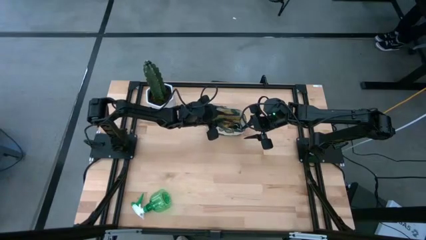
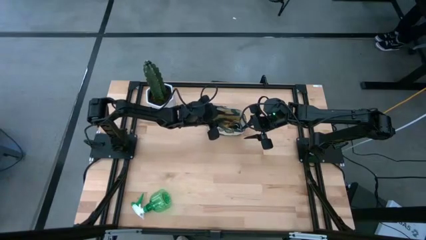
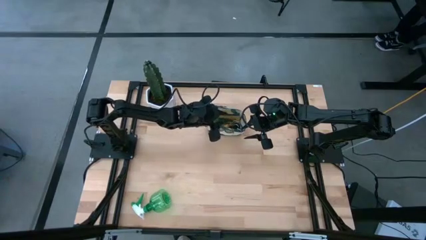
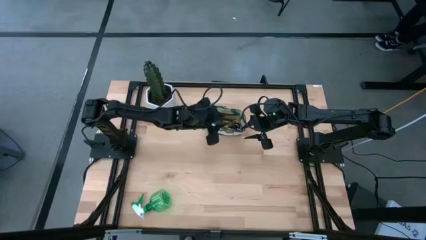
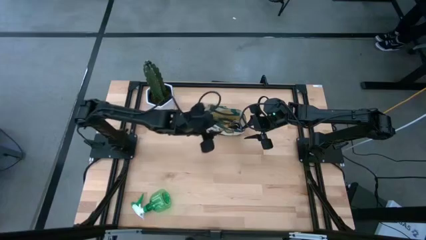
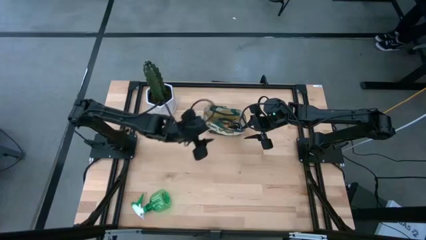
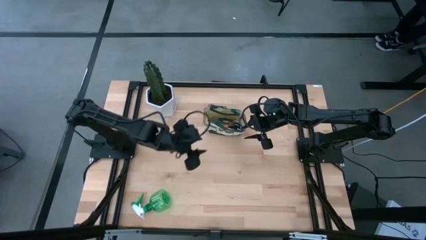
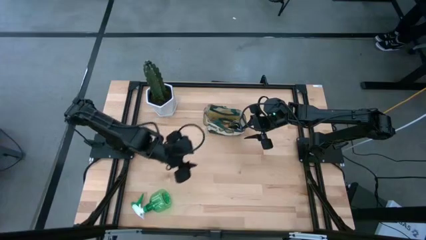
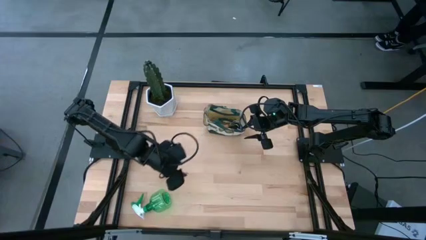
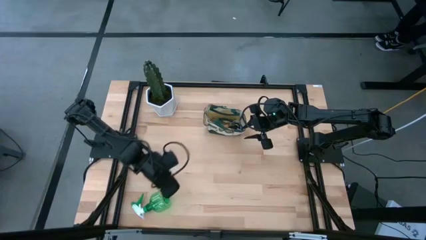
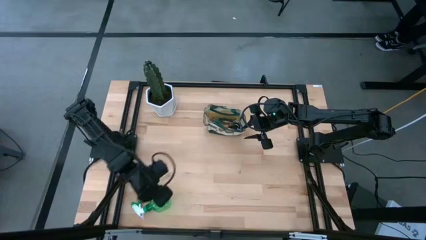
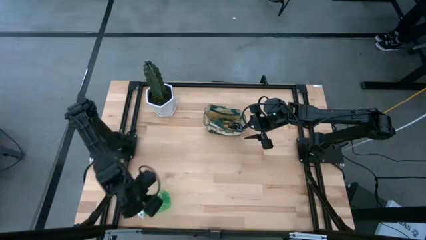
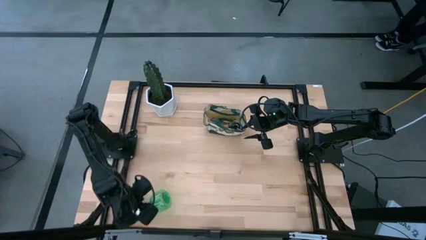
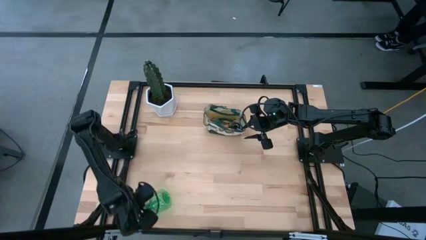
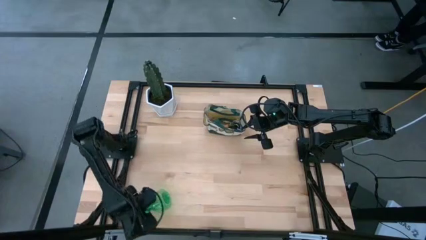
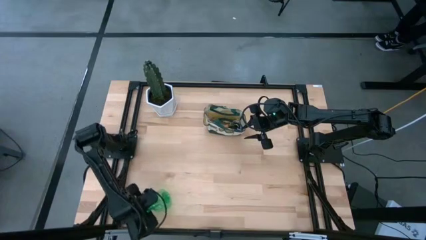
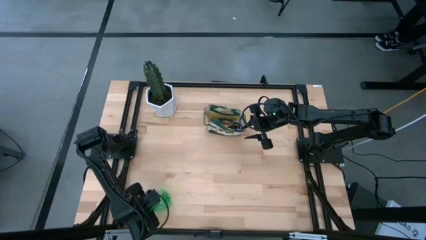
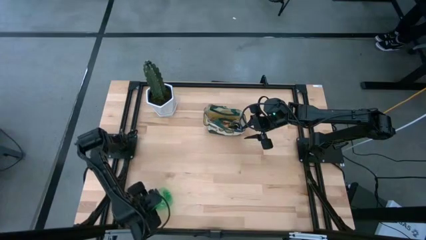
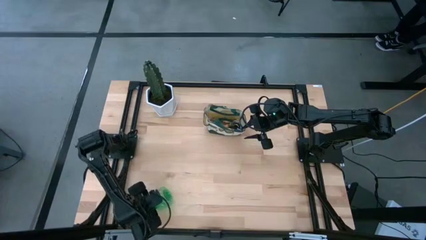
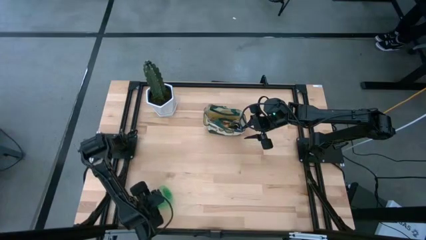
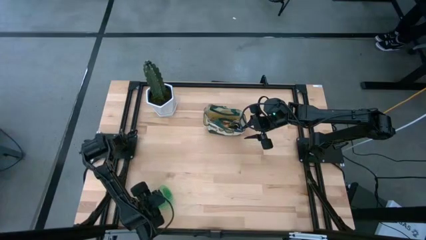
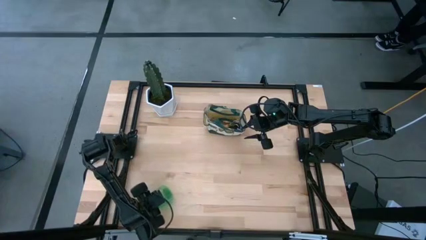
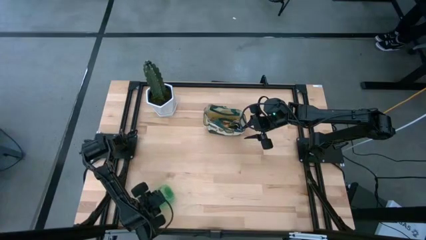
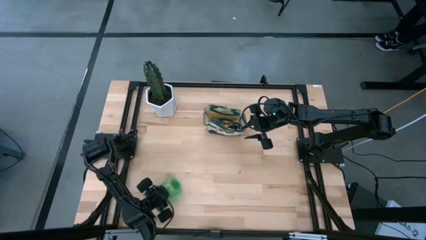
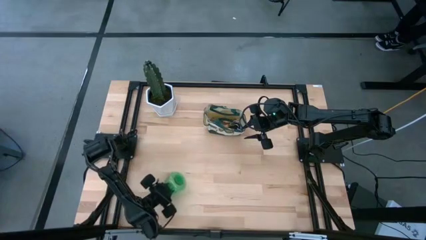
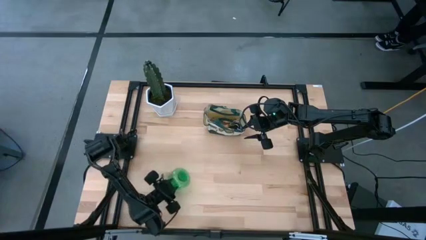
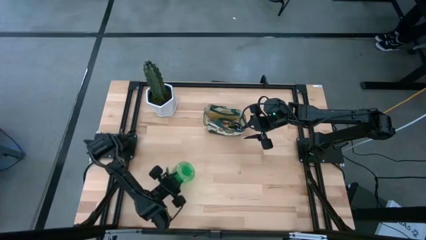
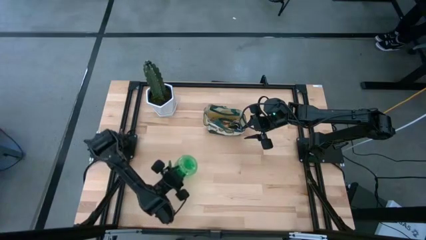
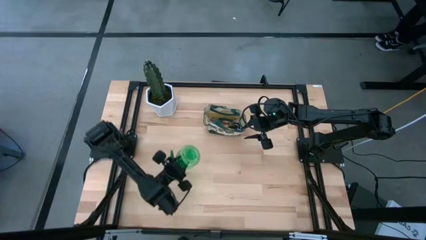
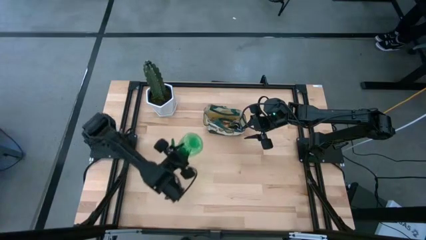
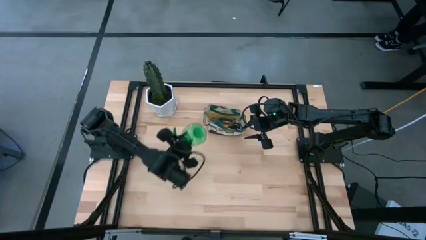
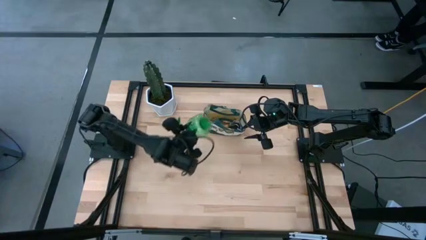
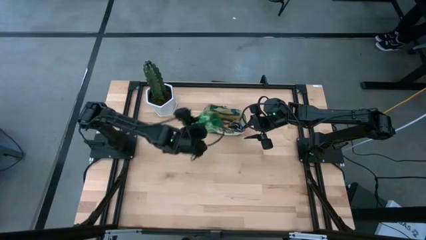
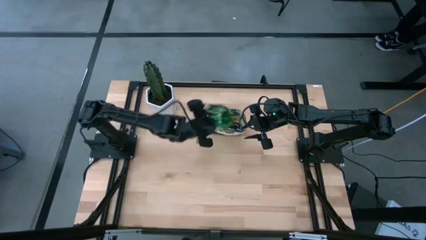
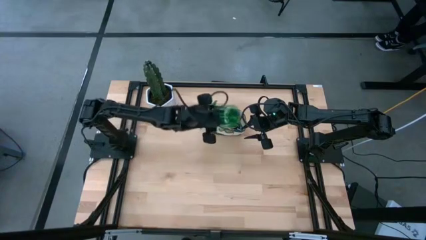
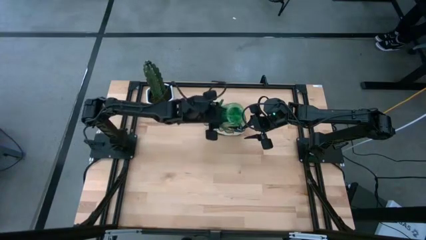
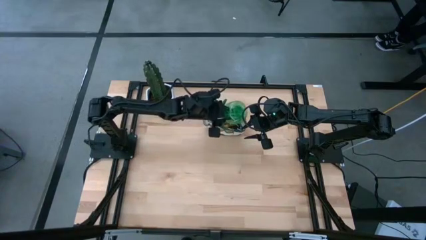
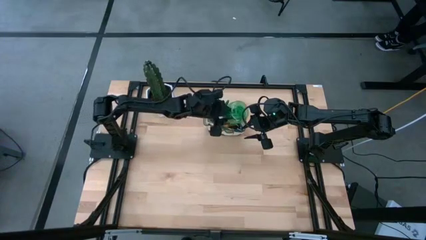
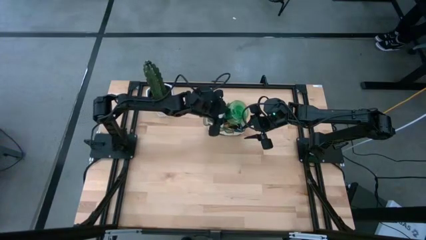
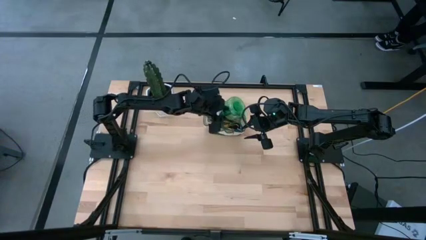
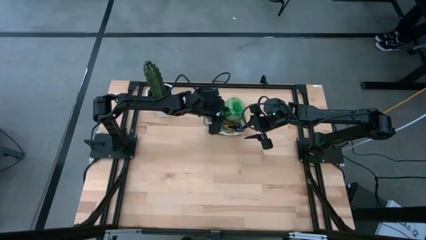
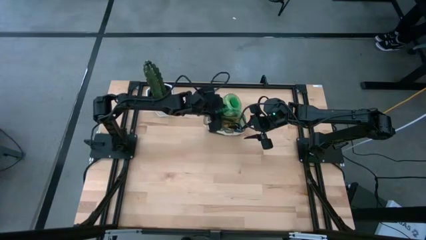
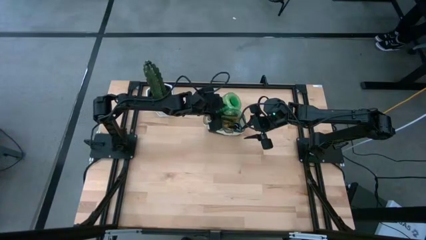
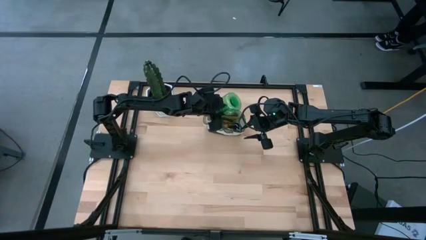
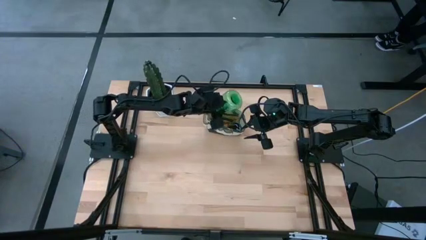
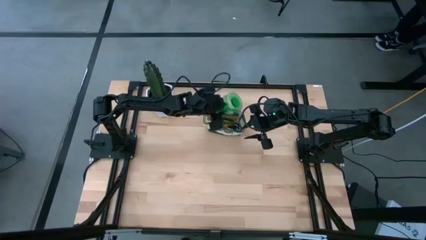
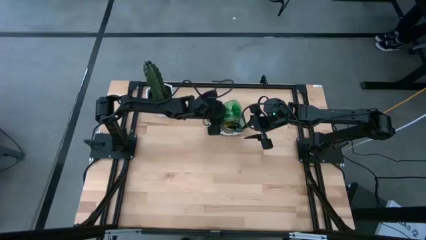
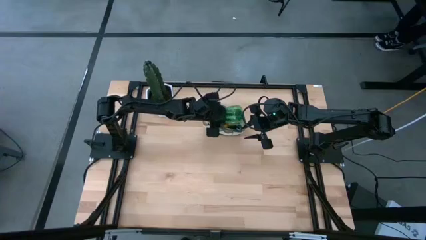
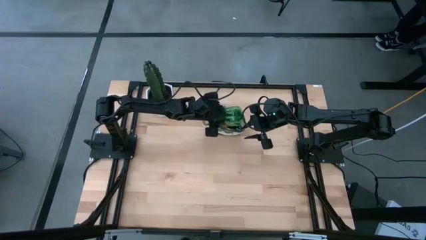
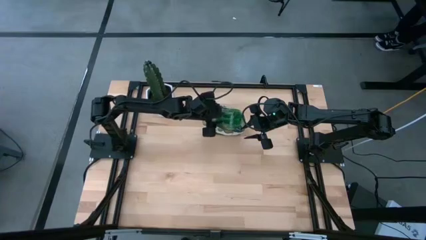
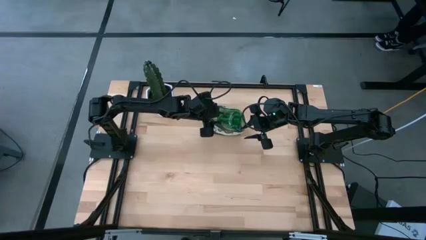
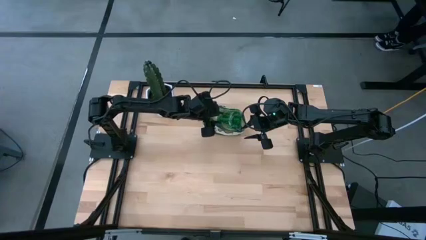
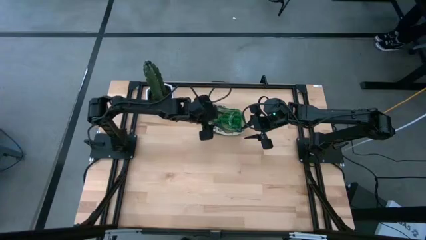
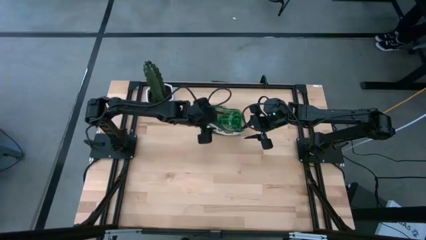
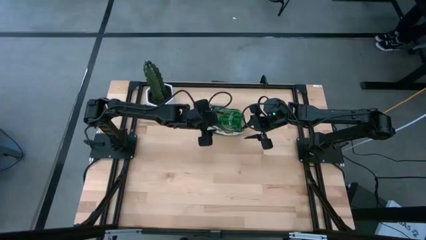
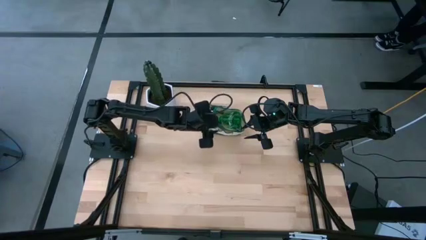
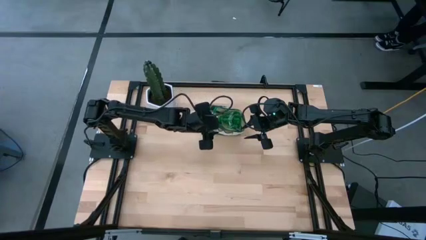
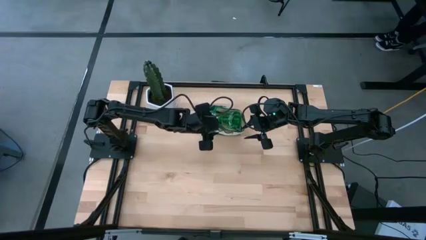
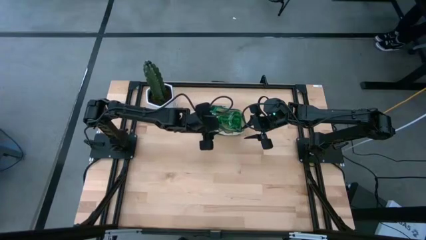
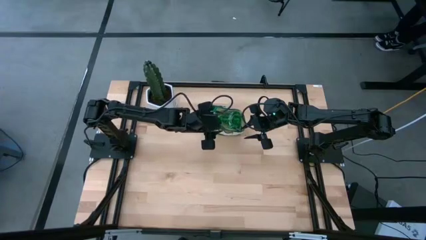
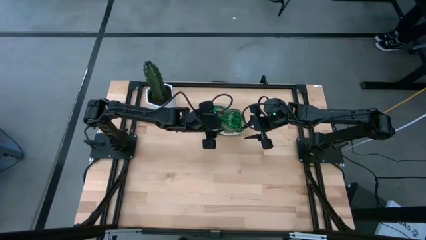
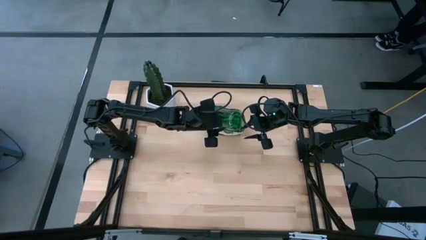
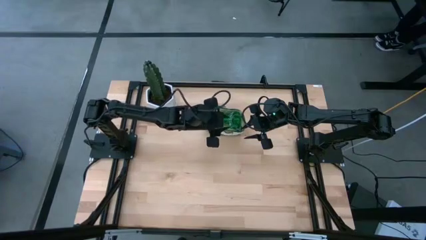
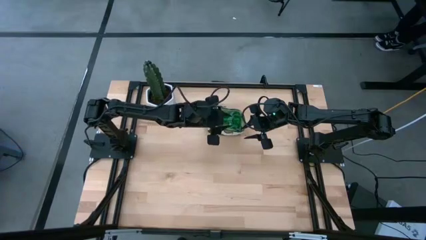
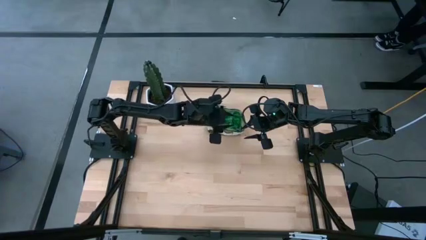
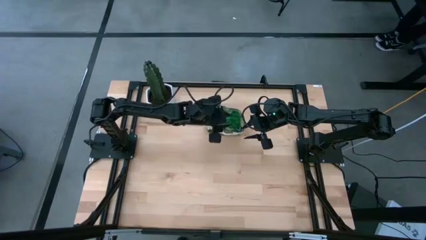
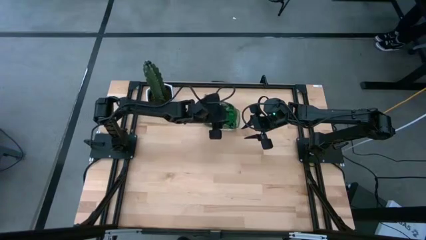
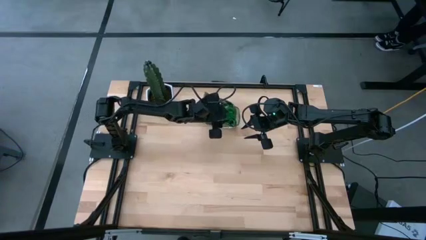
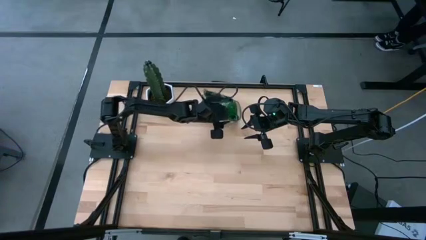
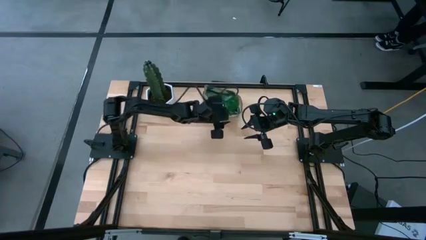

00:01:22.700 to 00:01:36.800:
Task: Pick & Place Garden tools in Gardening bag
Put the spray bottle into the gardening bag

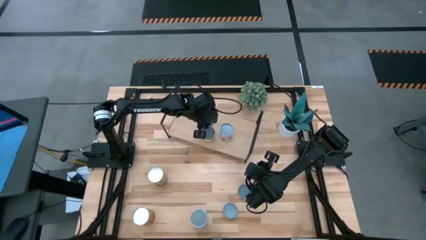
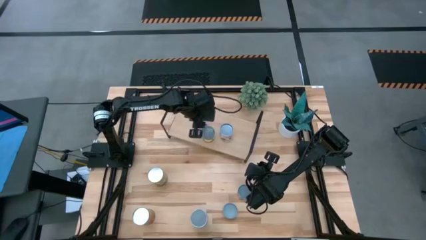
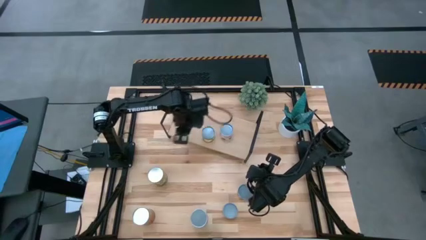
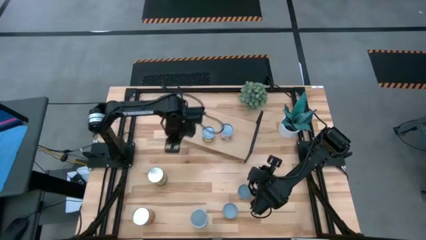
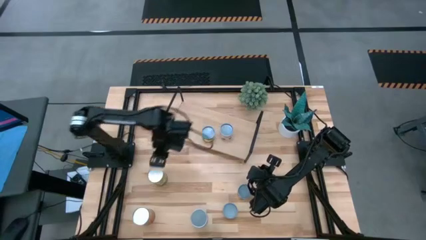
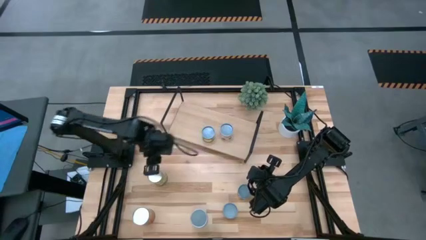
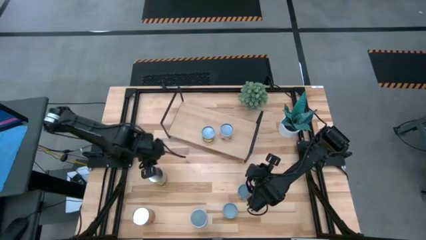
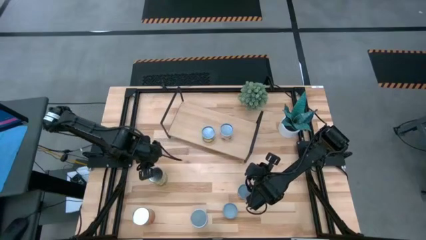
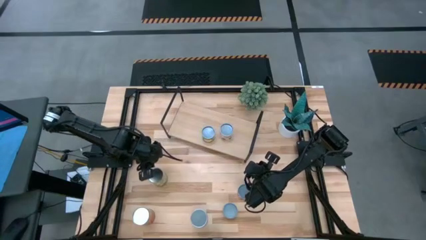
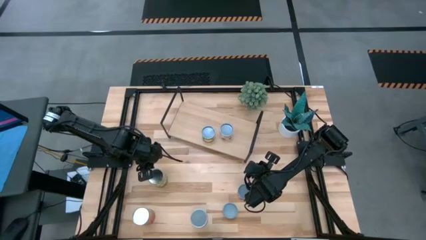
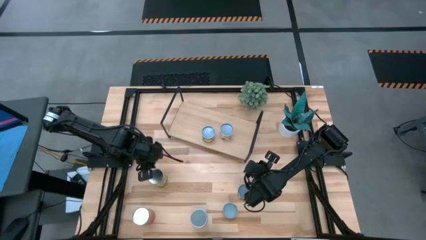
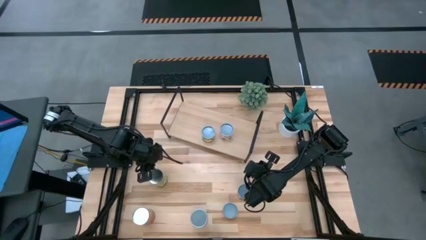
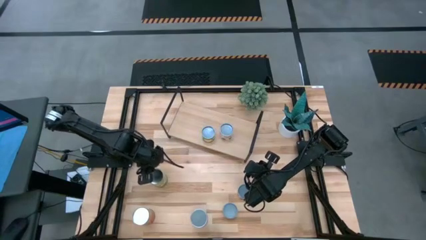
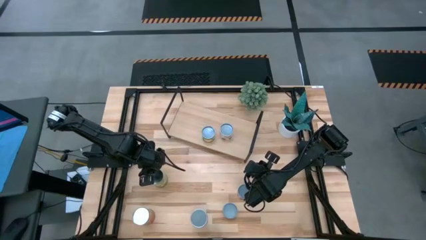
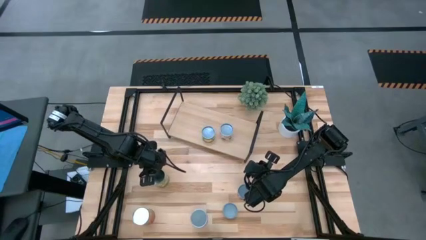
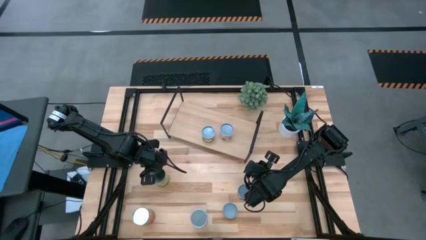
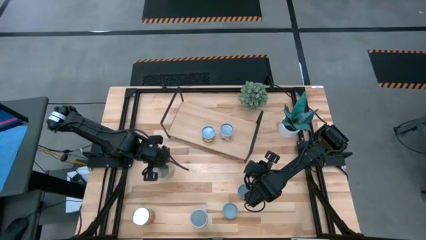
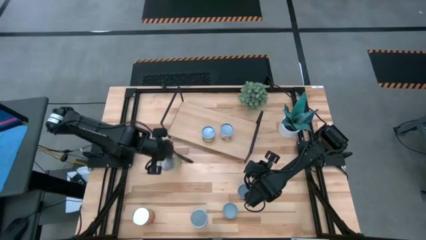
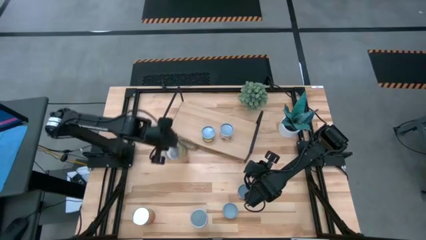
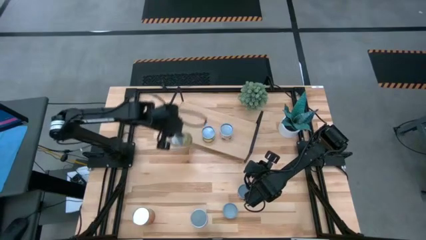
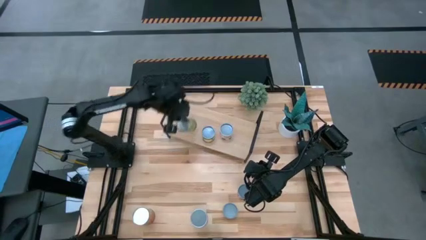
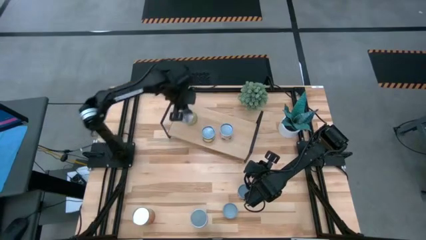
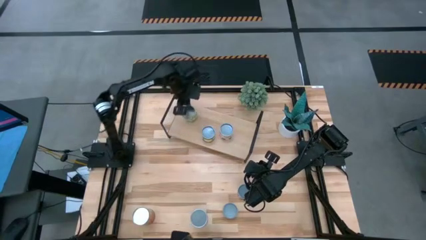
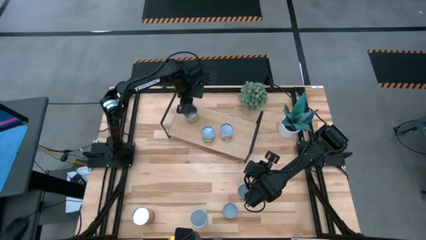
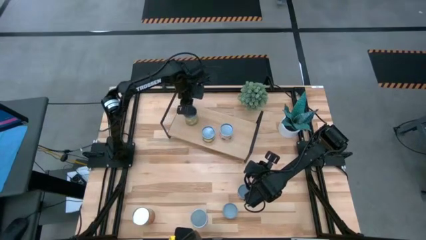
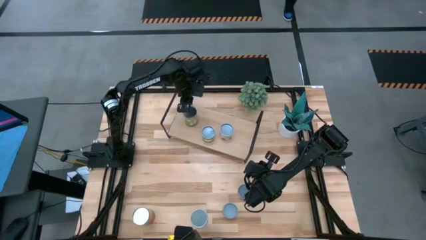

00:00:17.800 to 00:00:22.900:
Task: Pick and place cans onto a shelf
Put the canned pears on the shelf
